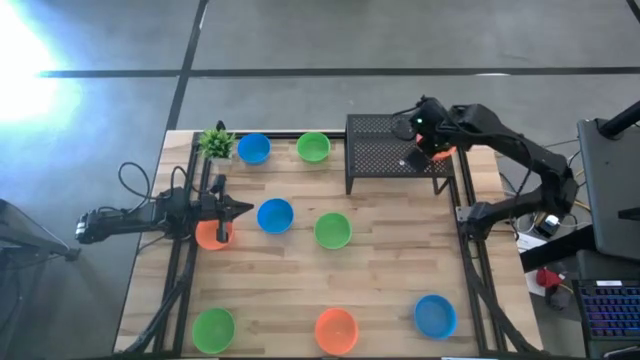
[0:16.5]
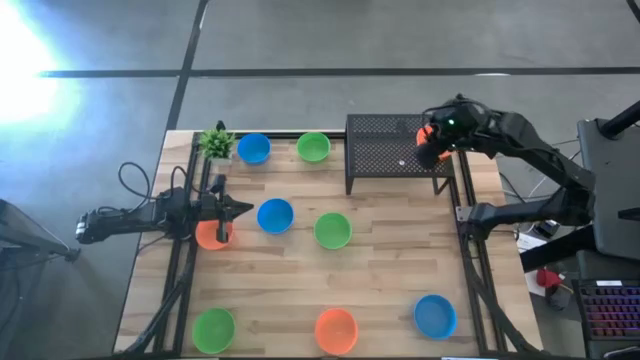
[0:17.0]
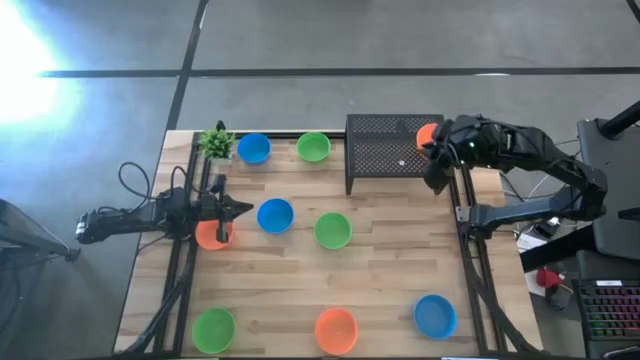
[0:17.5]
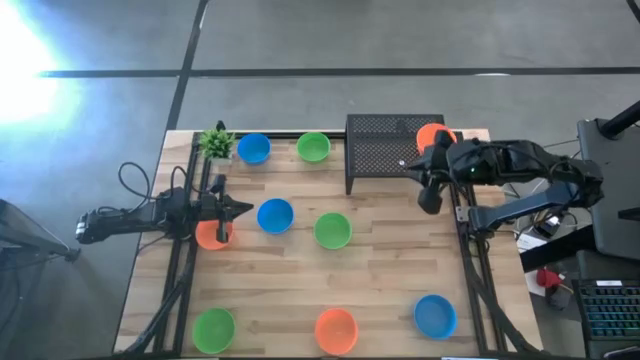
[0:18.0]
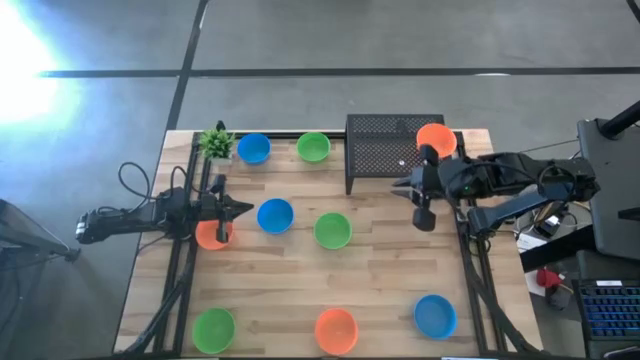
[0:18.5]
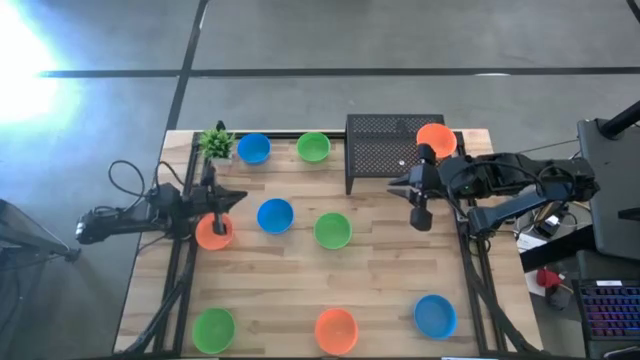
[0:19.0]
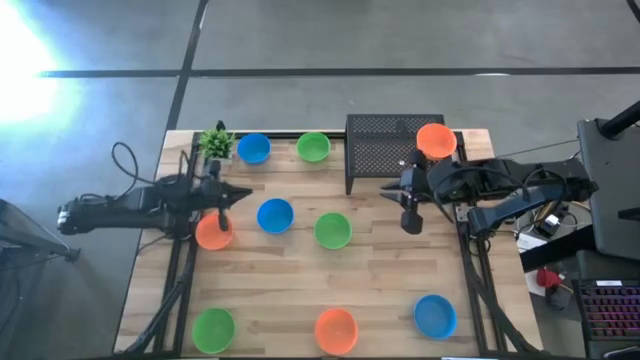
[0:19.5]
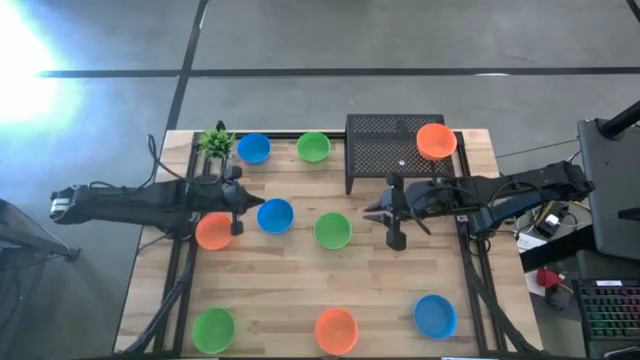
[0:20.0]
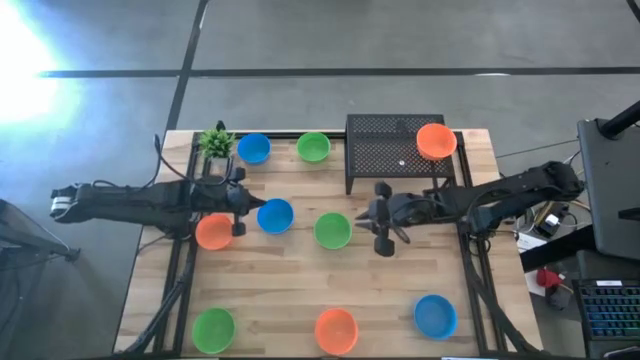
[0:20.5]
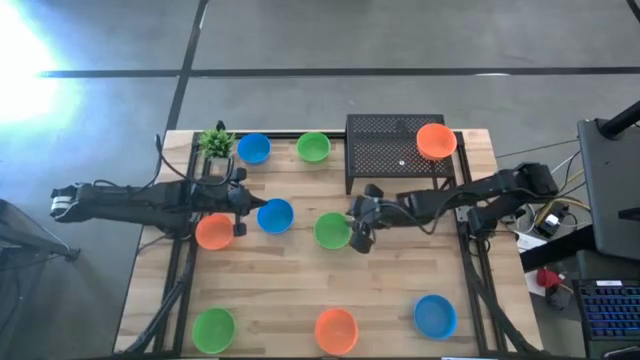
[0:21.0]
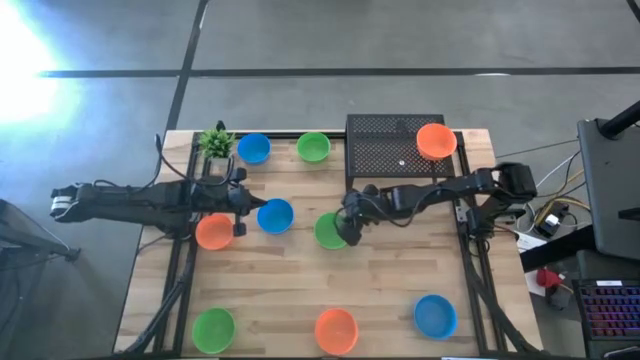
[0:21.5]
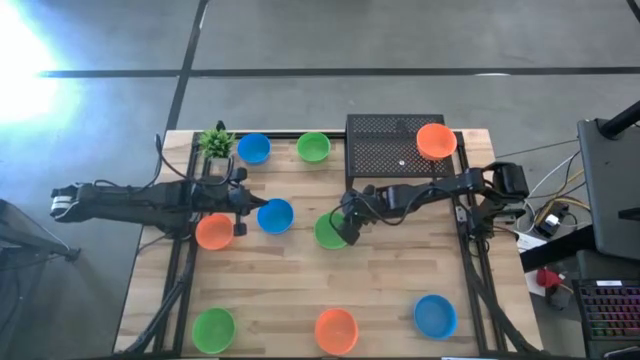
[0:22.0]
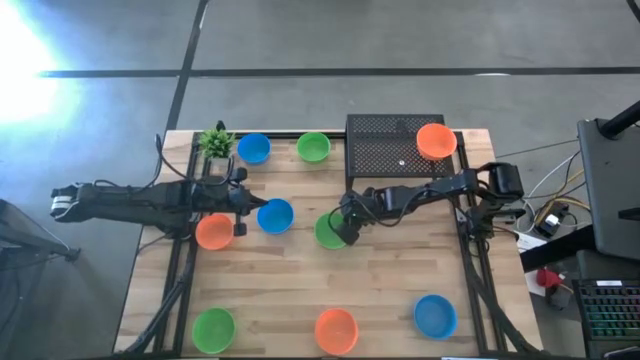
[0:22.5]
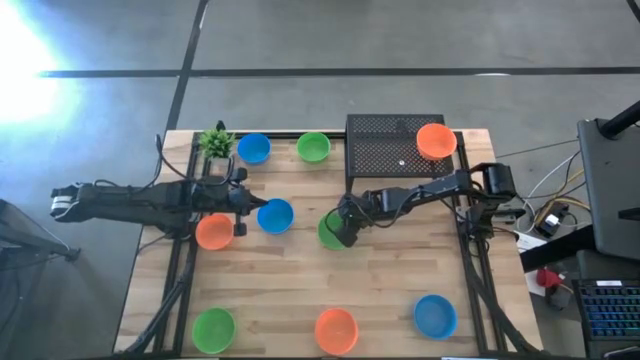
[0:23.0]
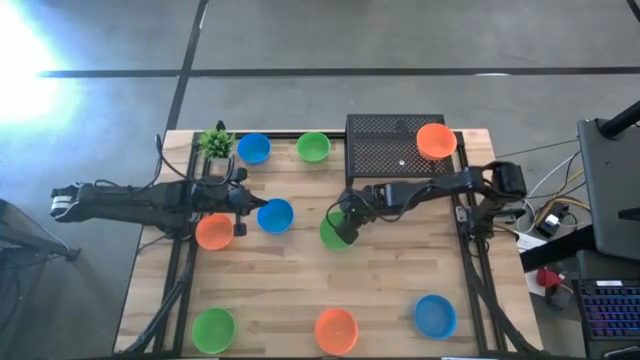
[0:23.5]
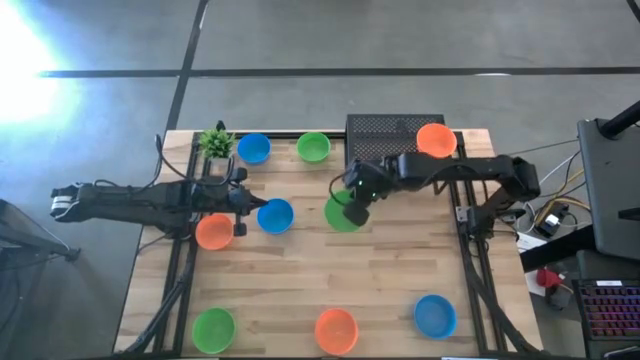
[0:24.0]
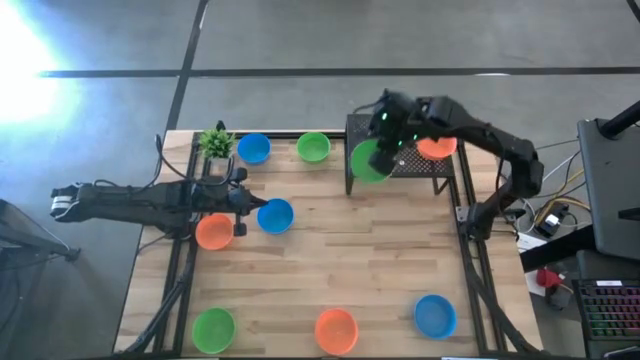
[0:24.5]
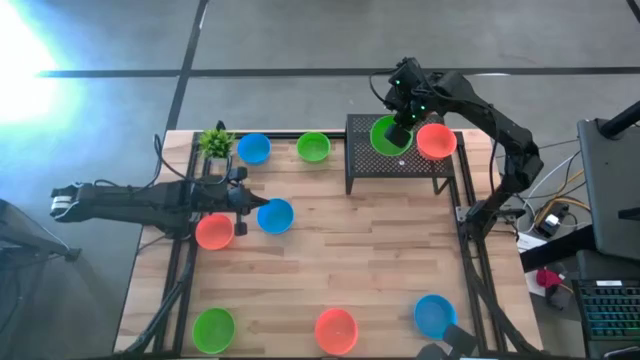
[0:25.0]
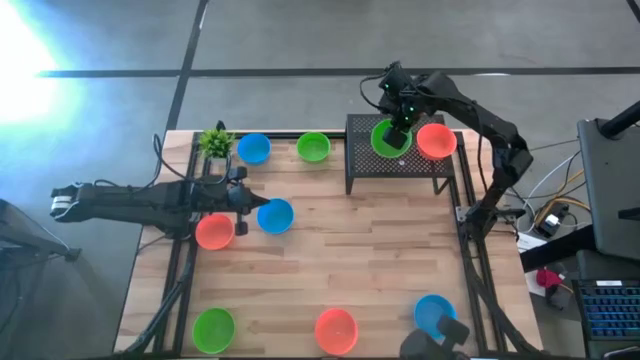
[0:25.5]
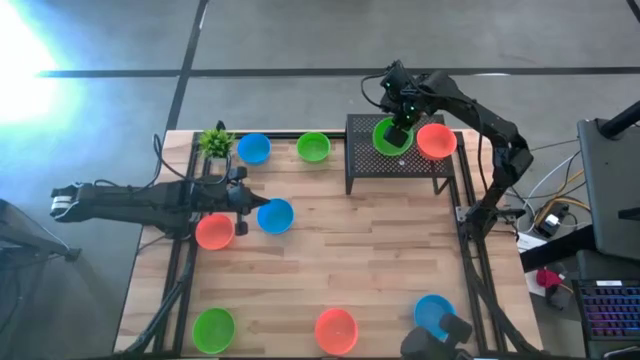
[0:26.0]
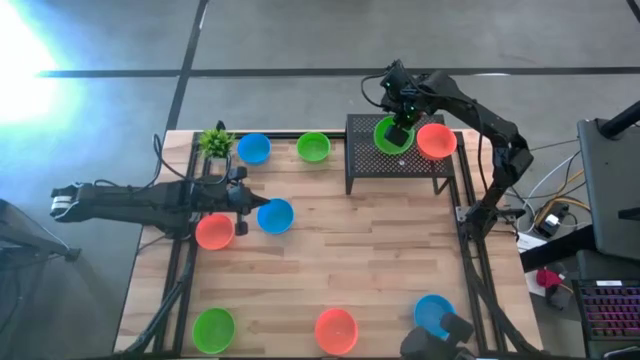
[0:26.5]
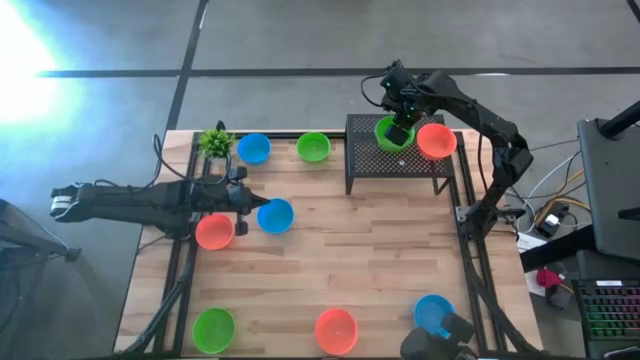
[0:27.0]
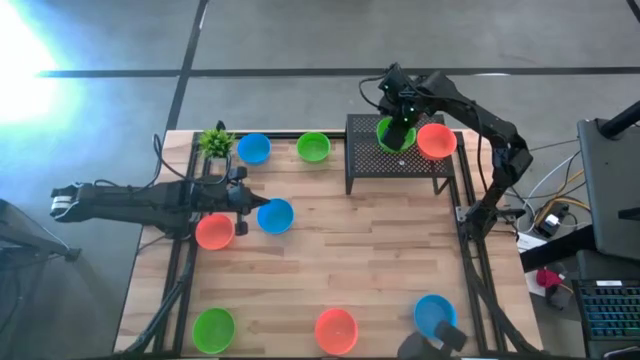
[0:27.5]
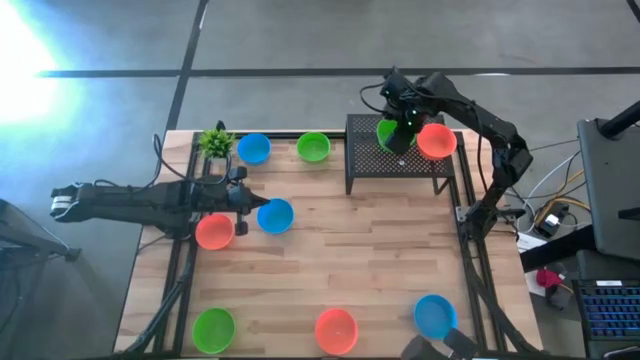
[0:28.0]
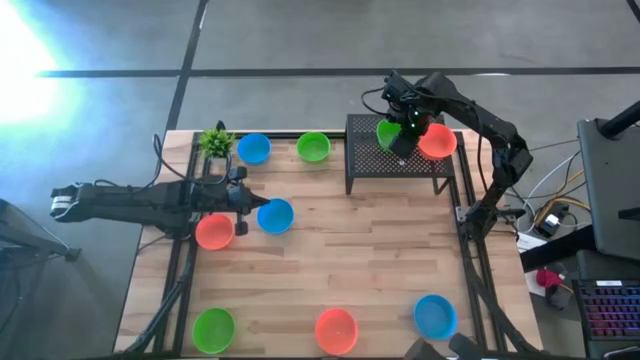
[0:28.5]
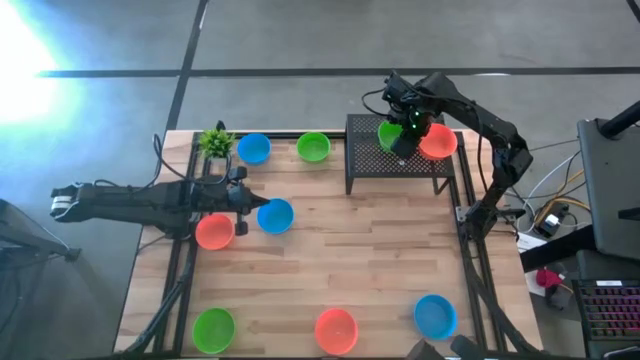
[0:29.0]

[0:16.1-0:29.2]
Task: Pick & Place Mini bowls
Put the middle green bowl on the shelf

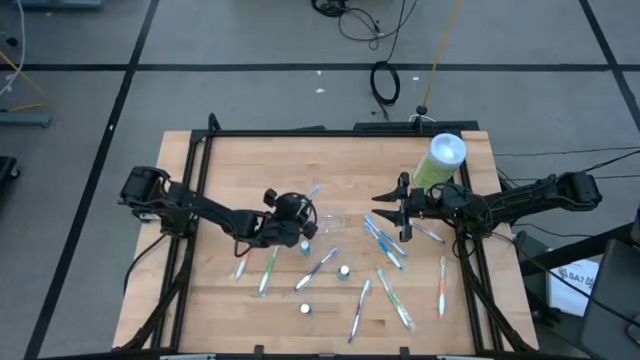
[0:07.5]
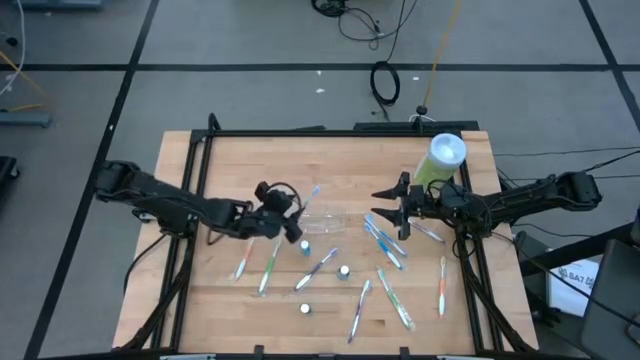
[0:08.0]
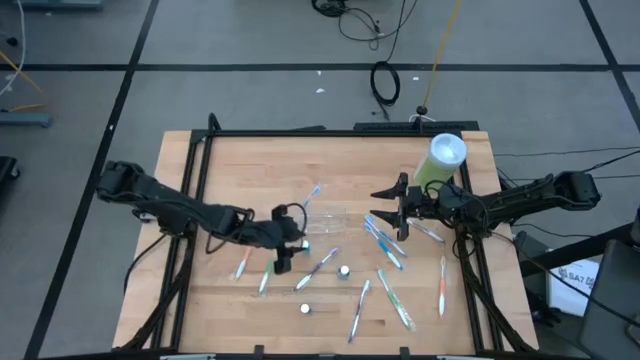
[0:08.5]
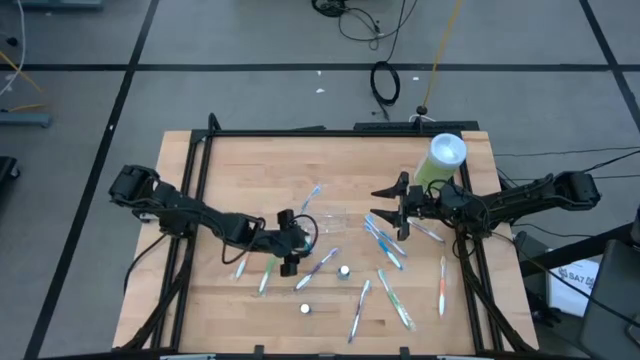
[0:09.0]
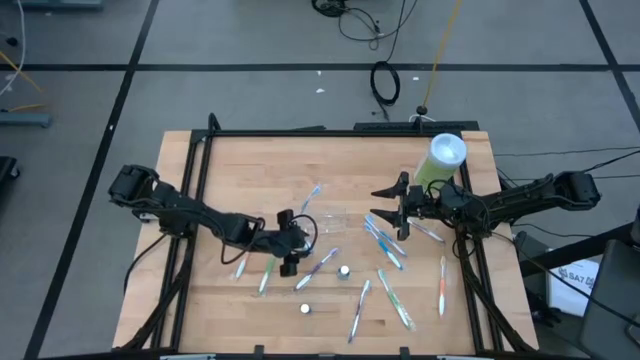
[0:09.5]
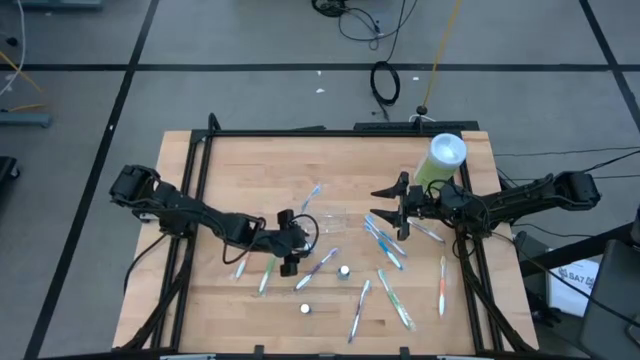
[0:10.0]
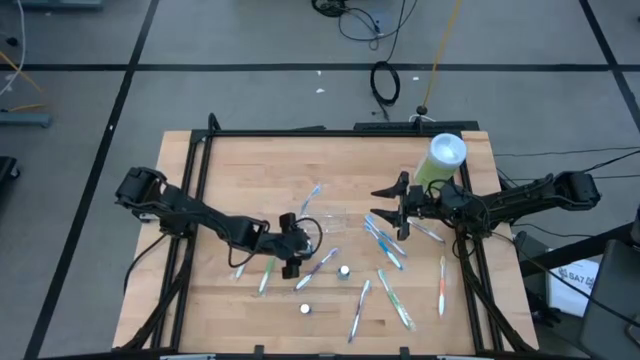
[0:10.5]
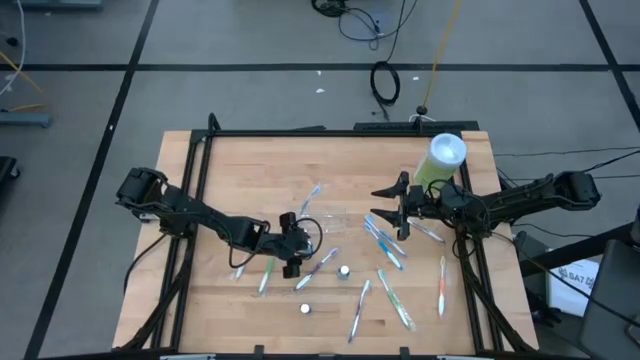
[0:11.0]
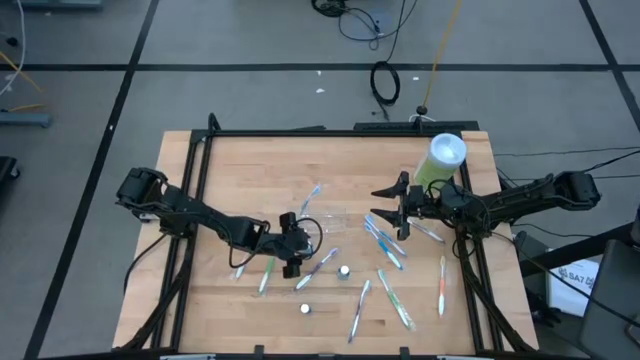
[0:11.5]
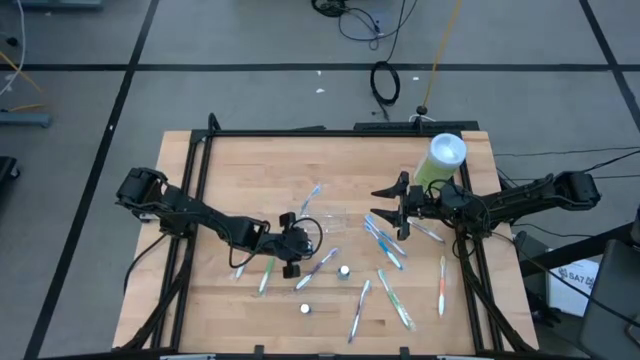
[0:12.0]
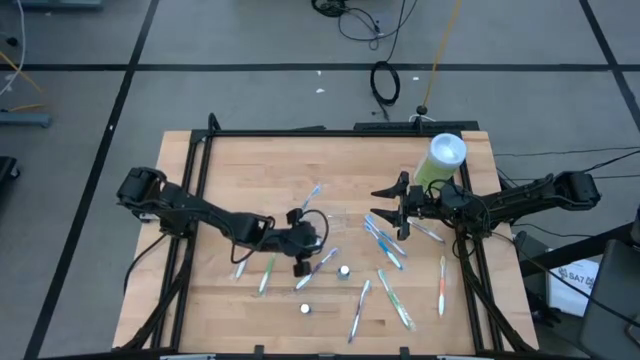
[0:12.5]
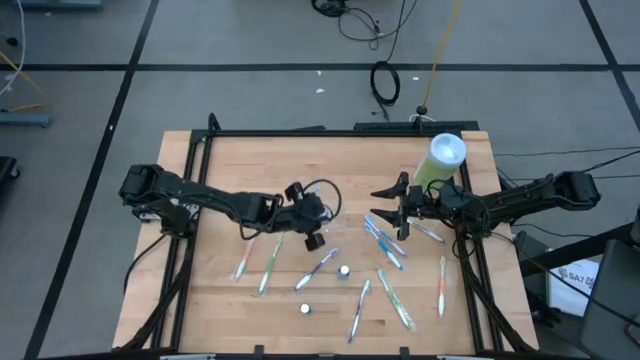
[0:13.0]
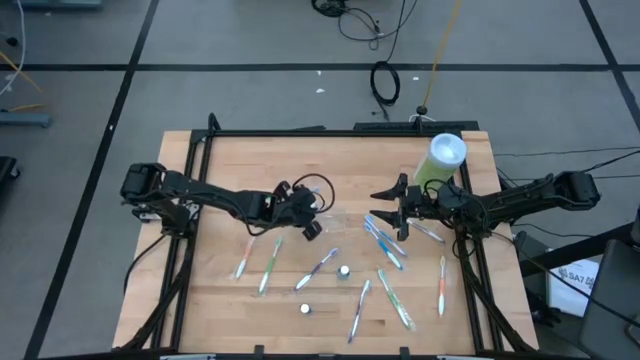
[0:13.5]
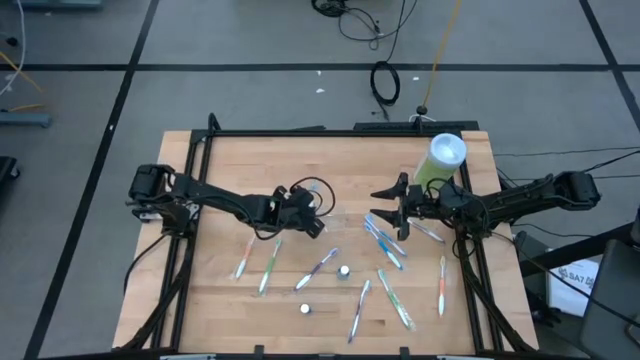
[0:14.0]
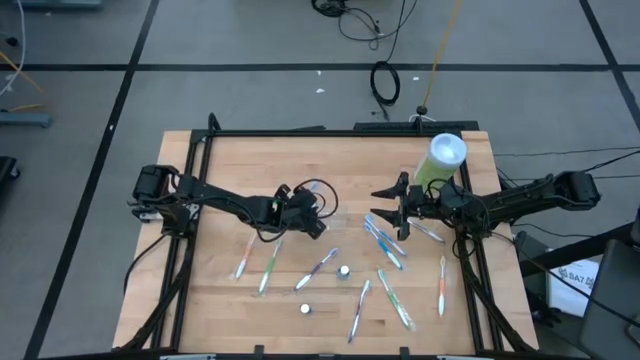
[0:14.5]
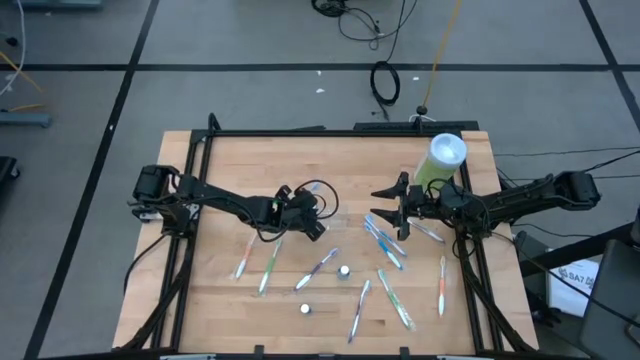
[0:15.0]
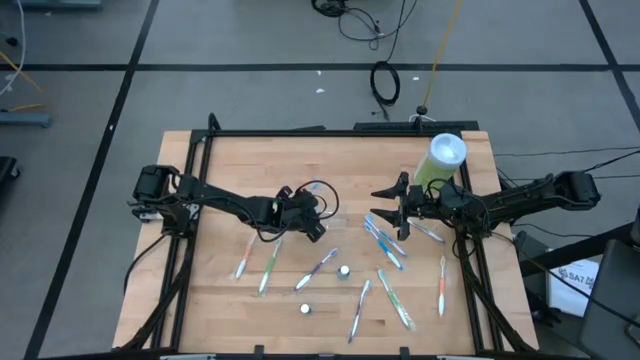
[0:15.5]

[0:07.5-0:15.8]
Task: Pick & Place toothbrushing station
Put the top blue mouthwash into the transparent organizer
